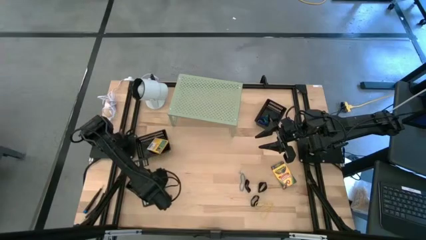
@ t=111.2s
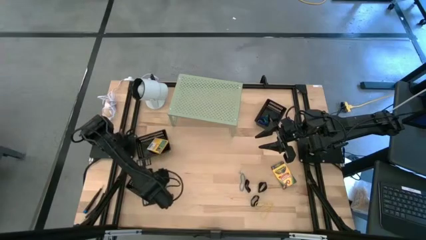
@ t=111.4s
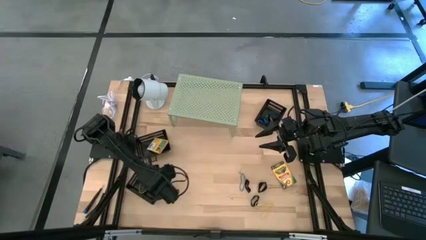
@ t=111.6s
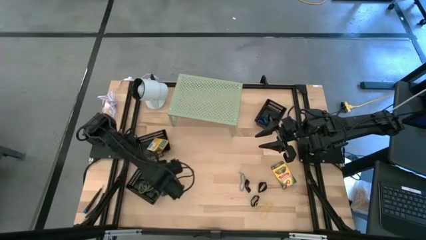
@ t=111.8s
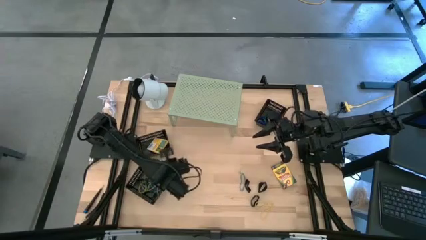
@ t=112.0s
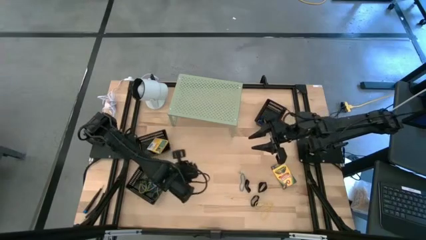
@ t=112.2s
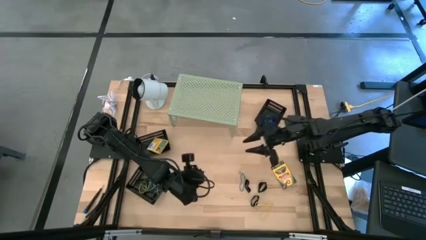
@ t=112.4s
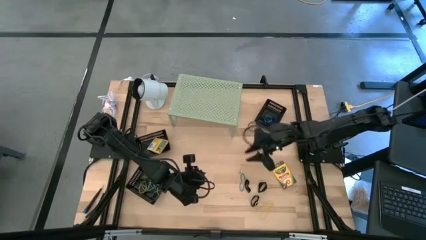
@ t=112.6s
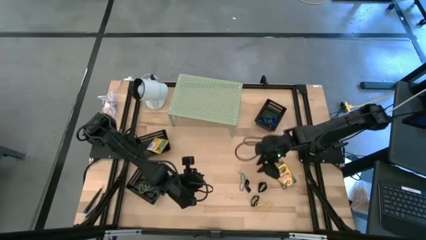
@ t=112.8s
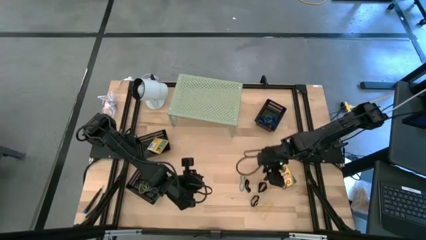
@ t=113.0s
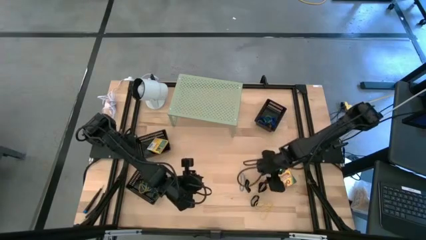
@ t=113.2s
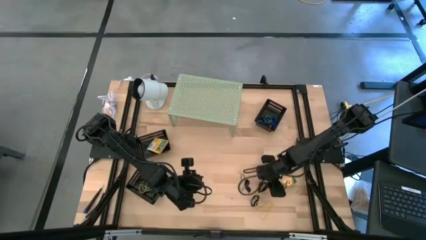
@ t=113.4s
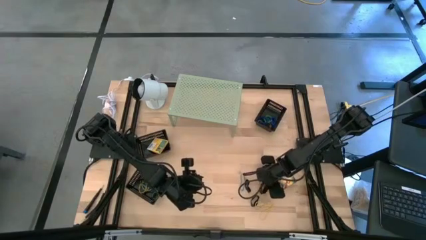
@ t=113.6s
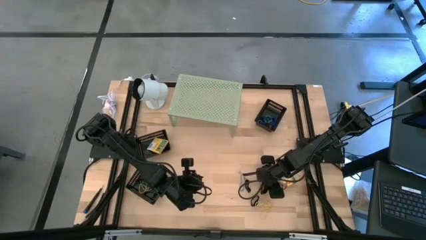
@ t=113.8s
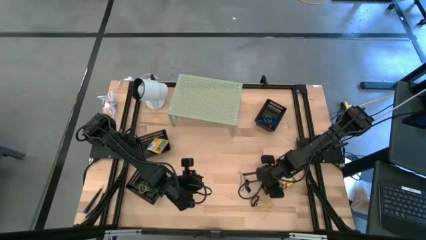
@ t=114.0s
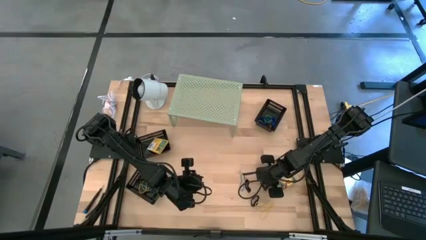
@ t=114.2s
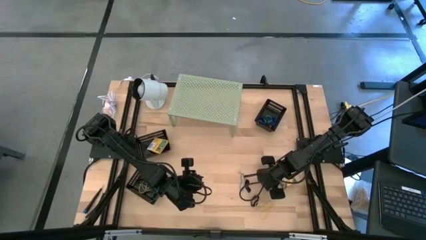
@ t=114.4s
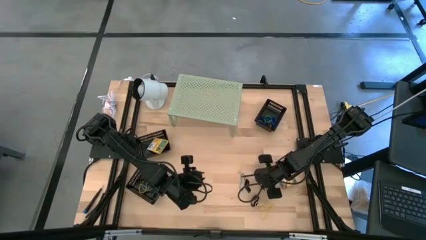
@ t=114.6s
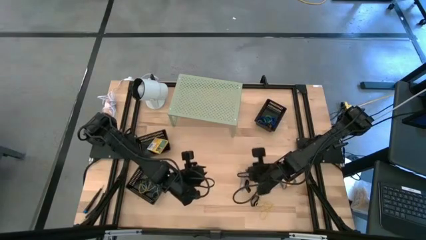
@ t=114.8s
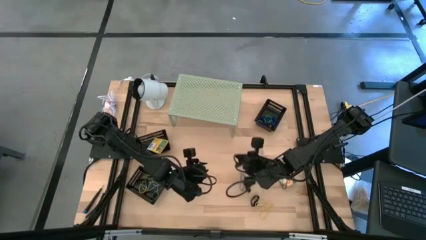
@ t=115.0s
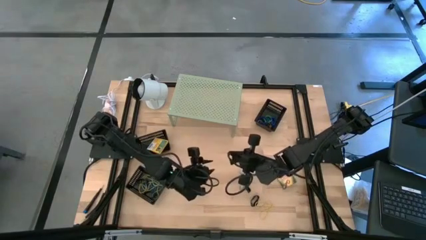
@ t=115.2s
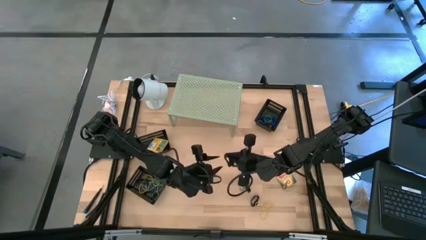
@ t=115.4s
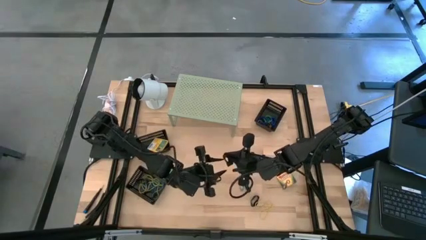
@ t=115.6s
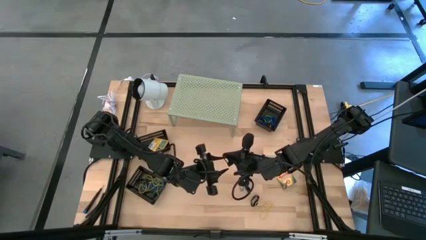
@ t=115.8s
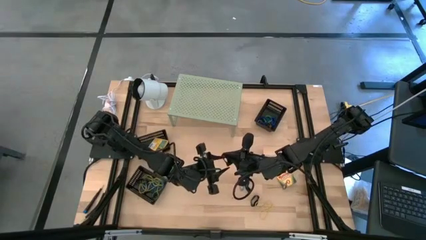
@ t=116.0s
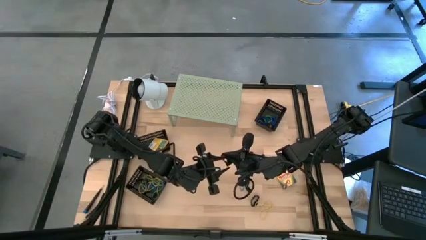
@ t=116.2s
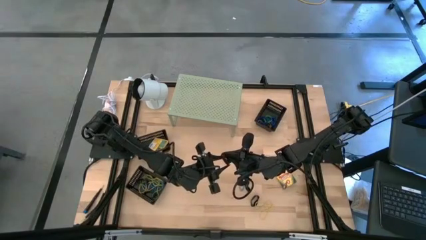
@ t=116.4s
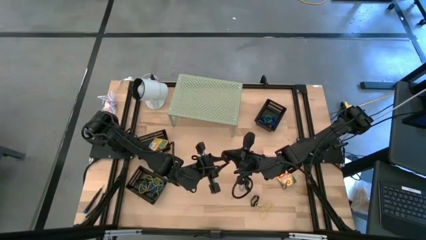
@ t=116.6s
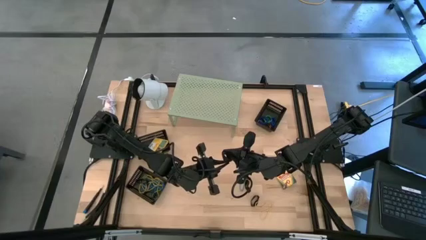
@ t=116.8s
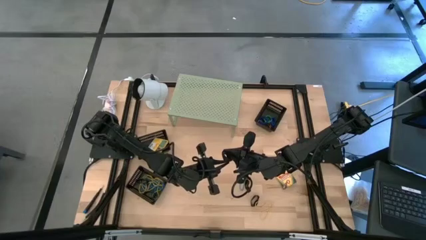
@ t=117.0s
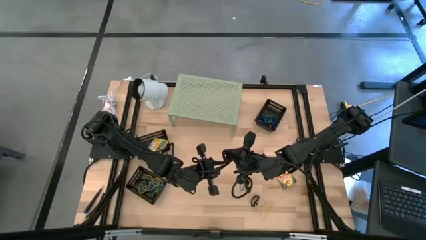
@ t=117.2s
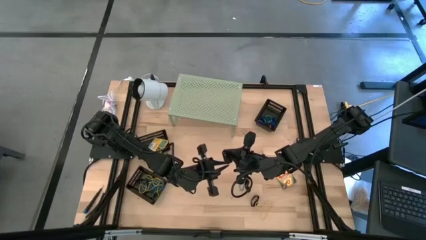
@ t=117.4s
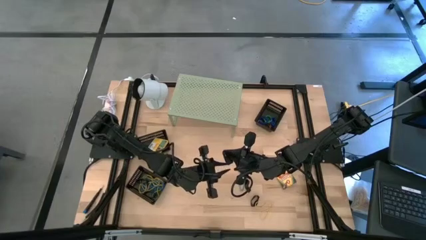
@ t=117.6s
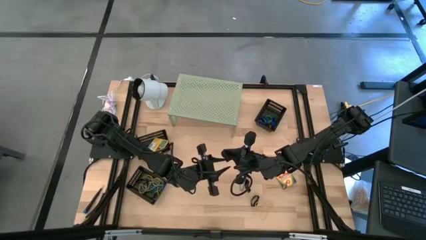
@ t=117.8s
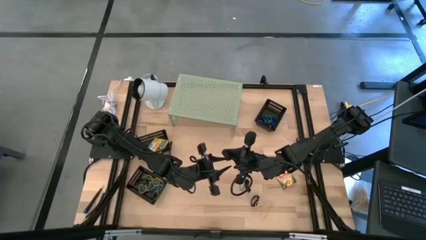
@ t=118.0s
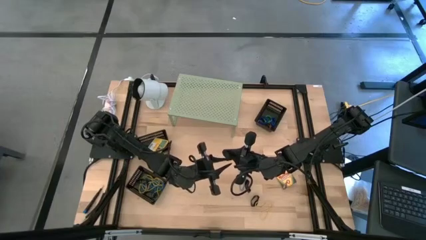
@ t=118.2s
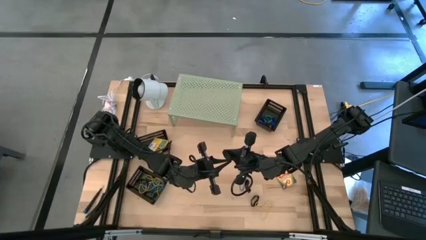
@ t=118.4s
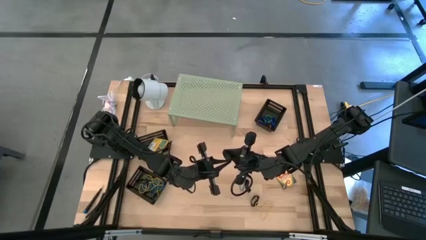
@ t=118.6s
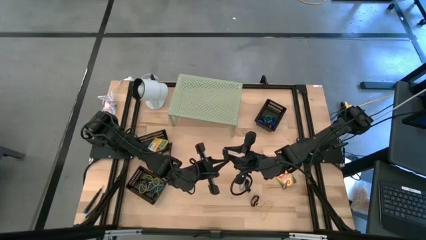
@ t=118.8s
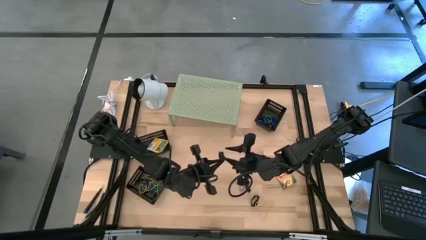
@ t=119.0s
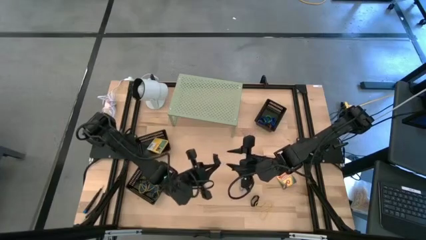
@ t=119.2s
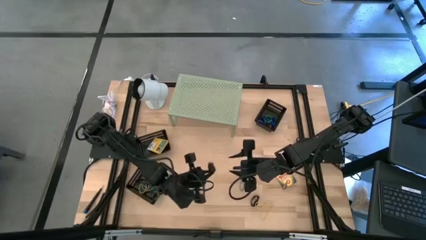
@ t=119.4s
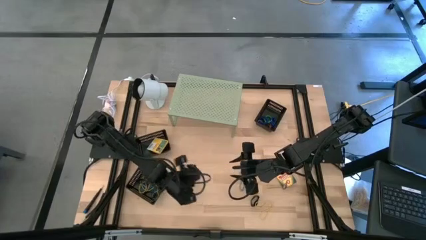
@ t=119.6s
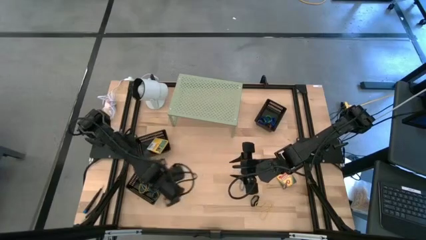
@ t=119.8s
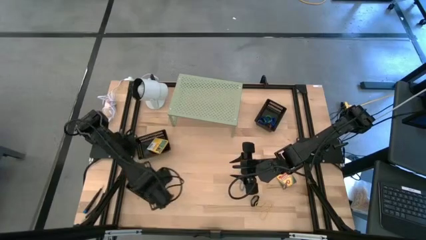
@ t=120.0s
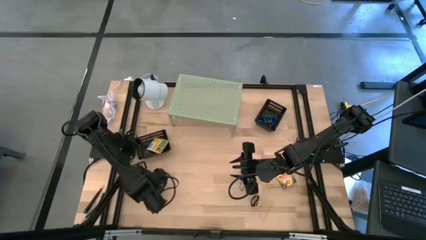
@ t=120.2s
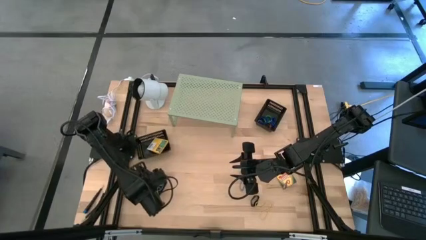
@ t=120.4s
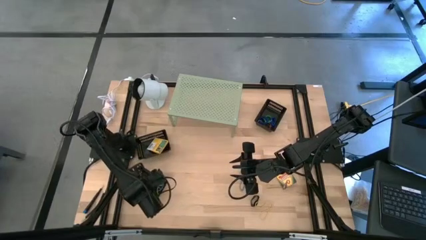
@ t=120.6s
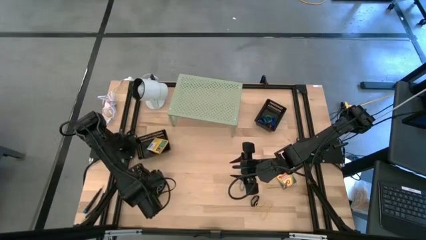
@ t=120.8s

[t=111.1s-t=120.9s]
Task: Pick & Place Office Desk Supplies
Put the black rubber band into the bottom left black bin

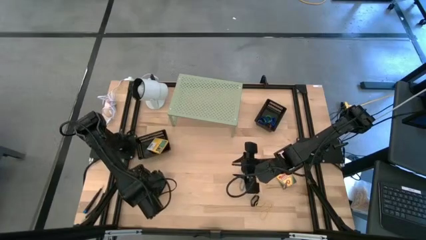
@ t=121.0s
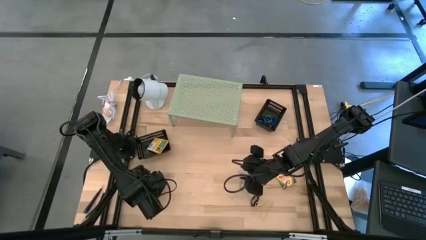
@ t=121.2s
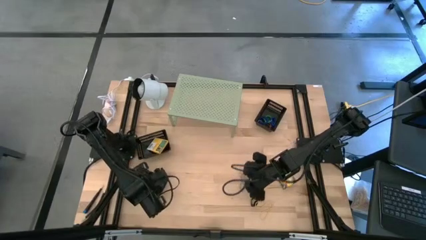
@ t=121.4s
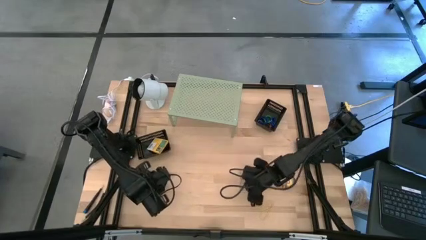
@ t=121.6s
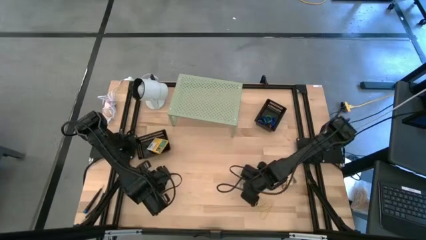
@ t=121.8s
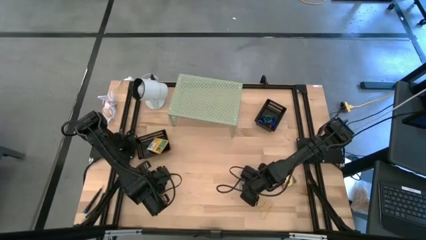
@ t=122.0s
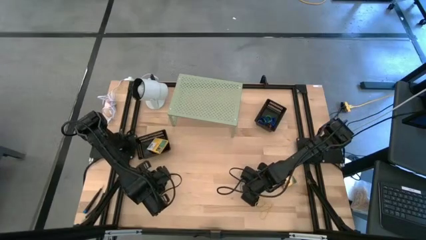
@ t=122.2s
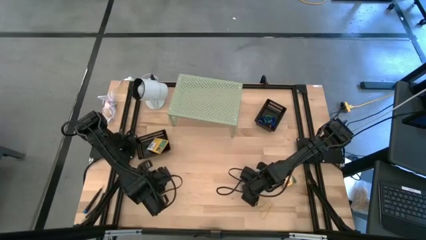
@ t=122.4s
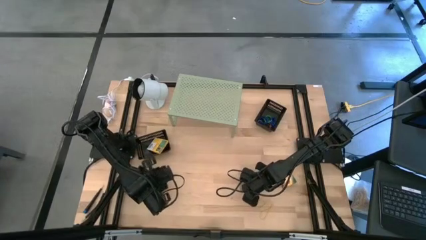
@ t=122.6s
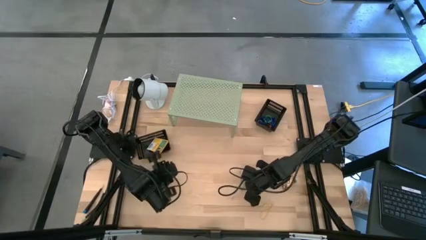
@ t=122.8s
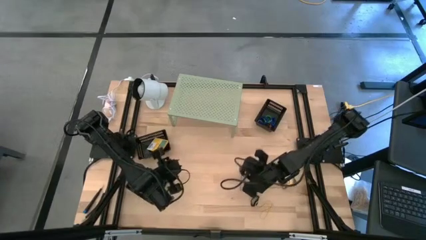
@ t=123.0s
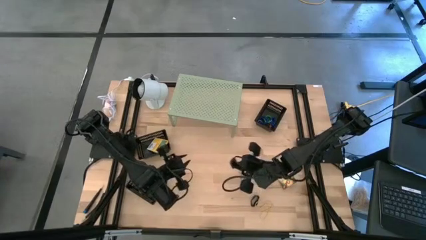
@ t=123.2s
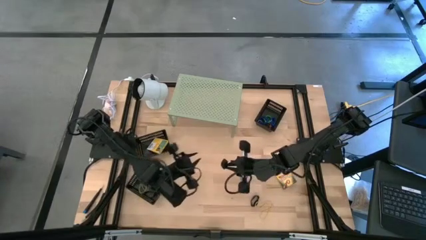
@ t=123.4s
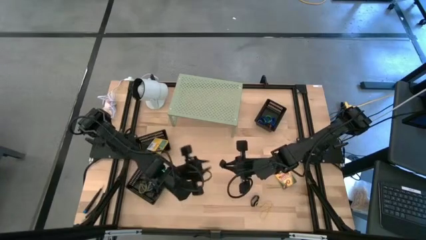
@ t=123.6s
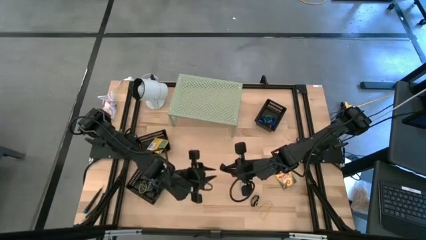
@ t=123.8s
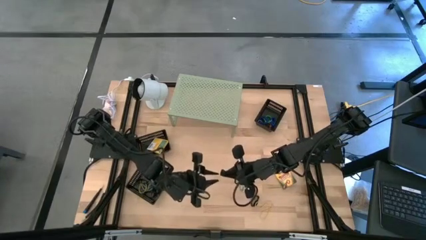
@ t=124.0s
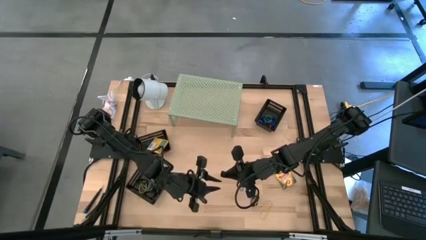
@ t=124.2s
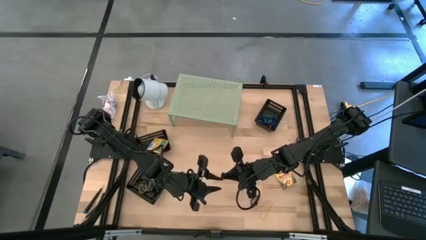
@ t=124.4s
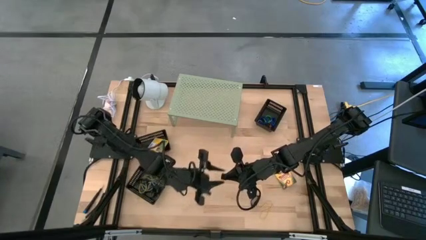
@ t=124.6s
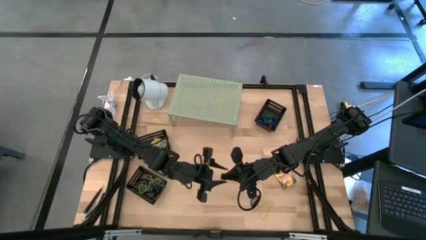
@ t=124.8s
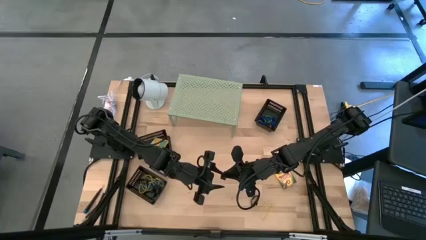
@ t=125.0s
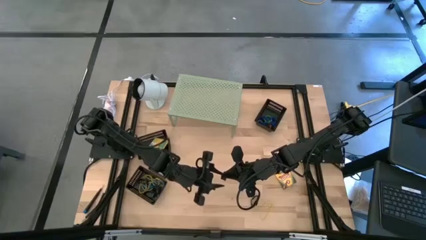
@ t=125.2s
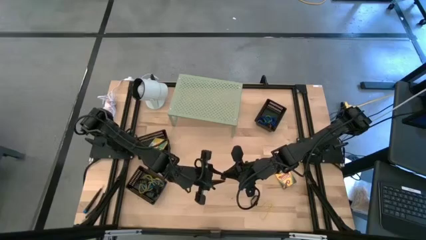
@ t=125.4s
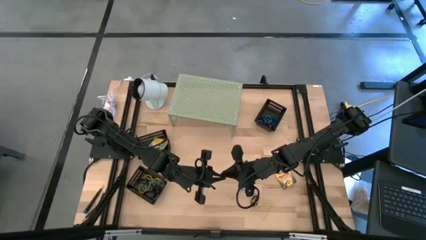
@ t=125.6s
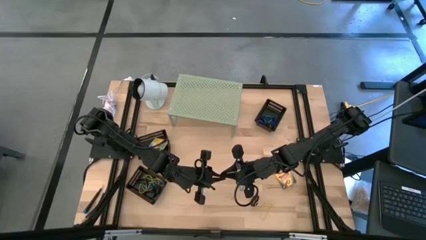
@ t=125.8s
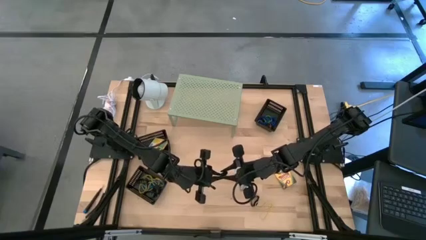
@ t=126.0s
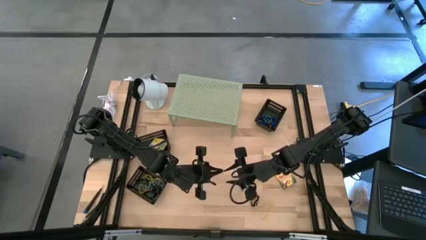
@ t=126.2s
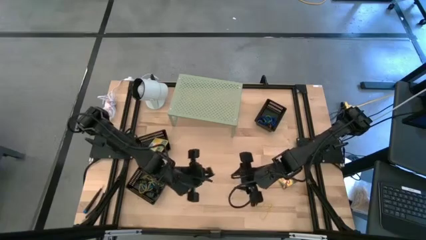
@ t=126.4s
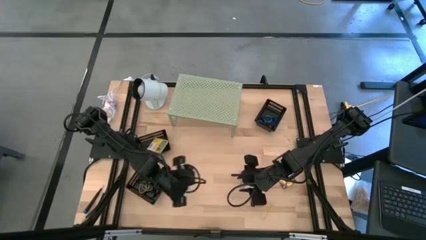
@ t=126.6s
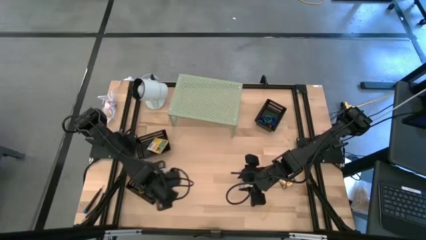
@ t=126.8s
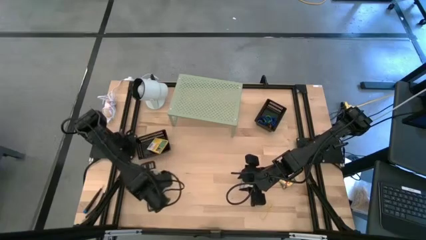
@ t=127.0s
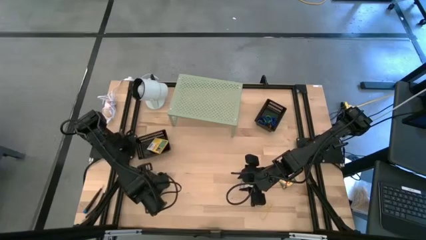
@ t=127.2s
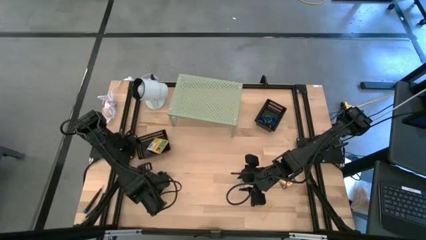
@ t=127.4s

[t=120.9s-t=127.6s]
Put the black rubber band into the bottom left black bin
